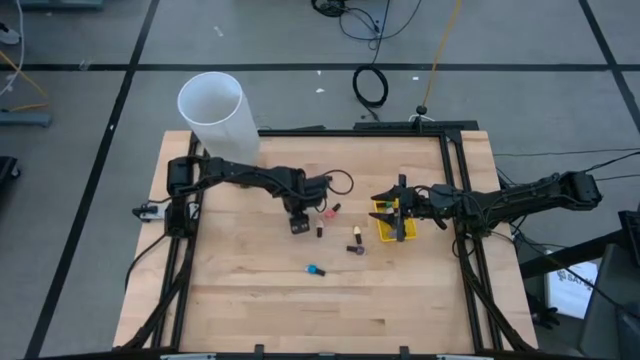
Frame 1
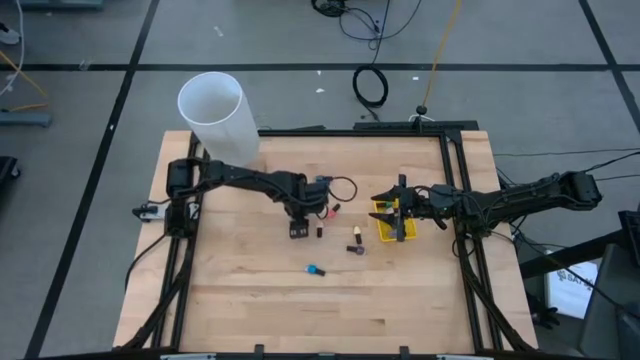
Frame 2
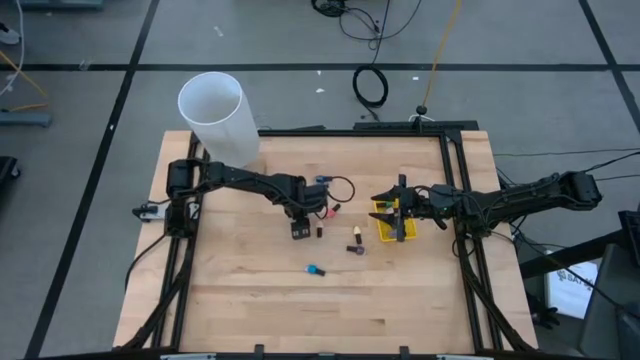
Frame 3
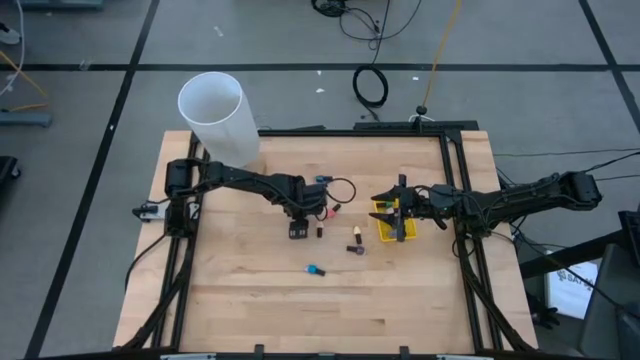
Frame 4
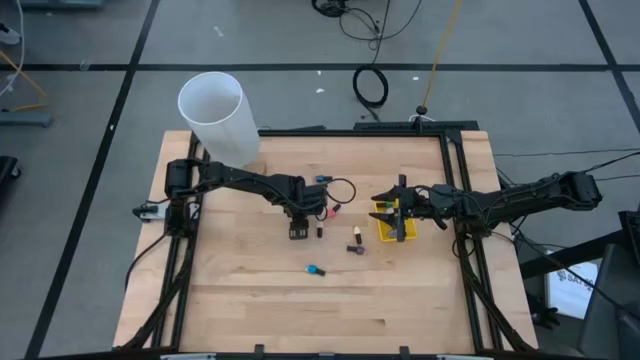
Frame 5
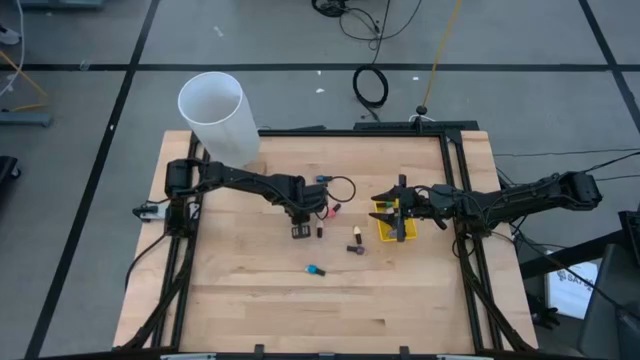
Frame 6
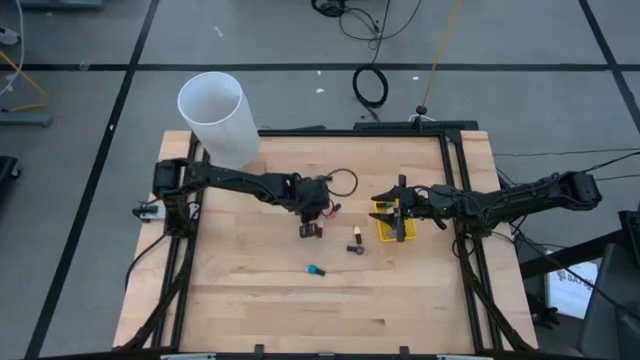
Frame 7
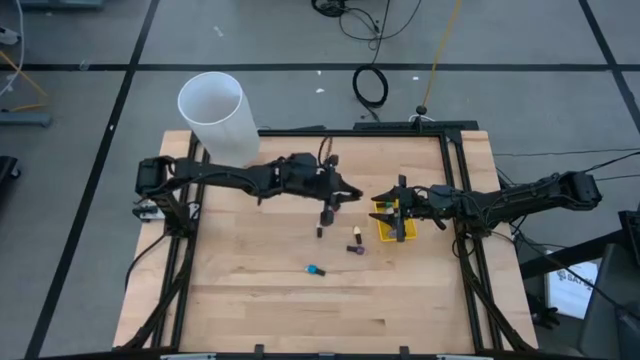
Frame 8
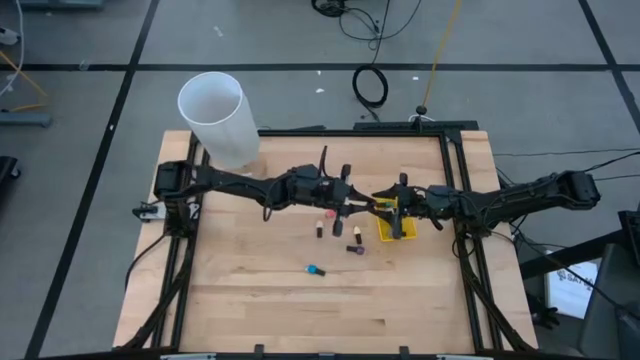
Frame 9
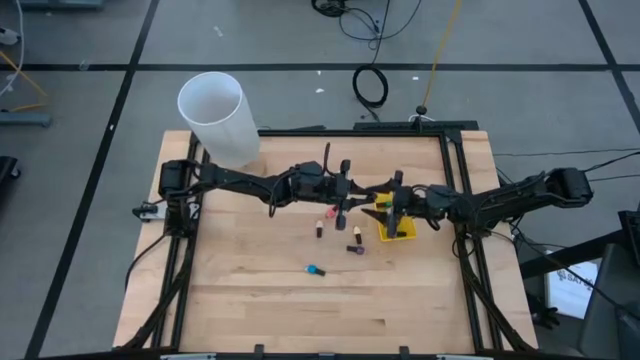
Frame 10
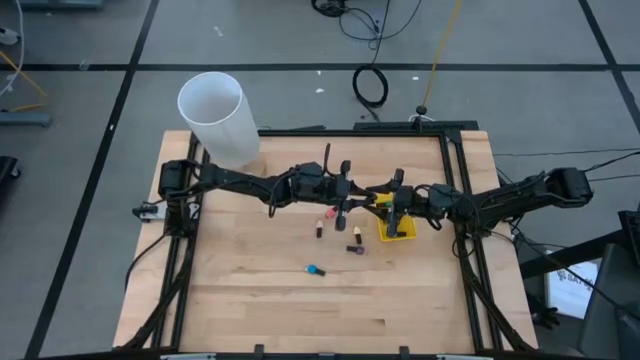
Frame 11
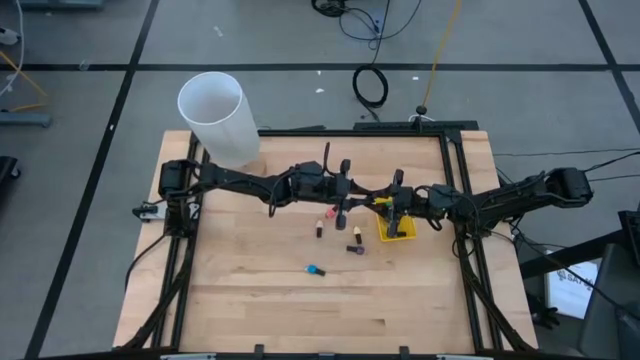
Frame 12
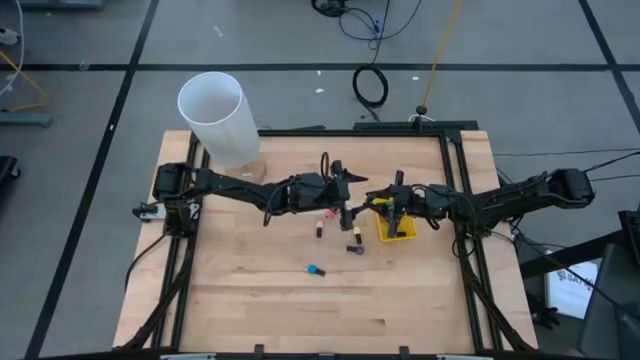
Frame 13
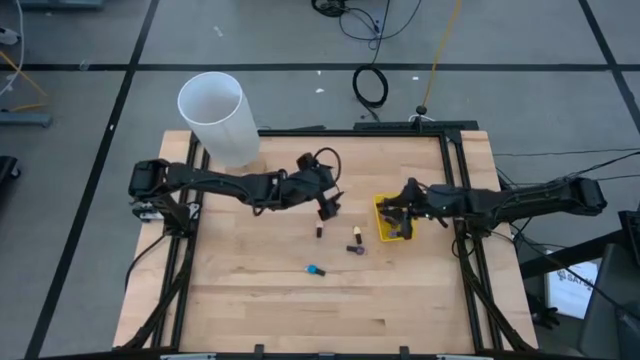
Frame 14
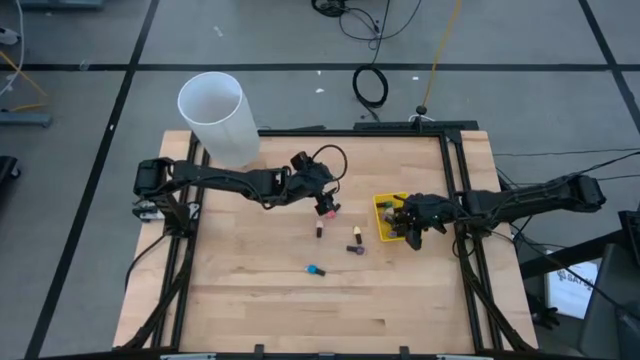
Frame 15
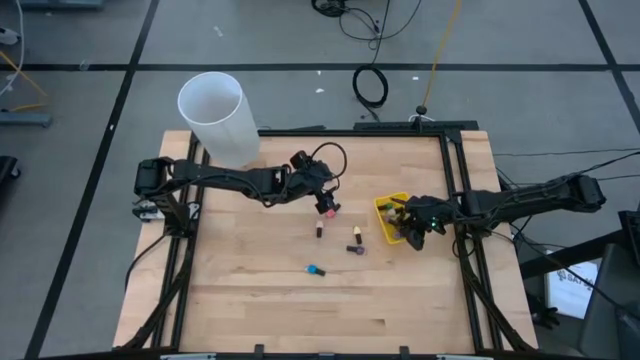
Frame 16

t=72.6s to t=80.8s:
Task: Pick & Place Nail Polish
Put the dark green nail polish into the yellow bin

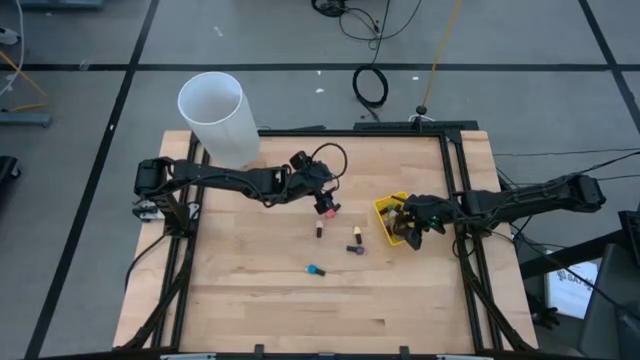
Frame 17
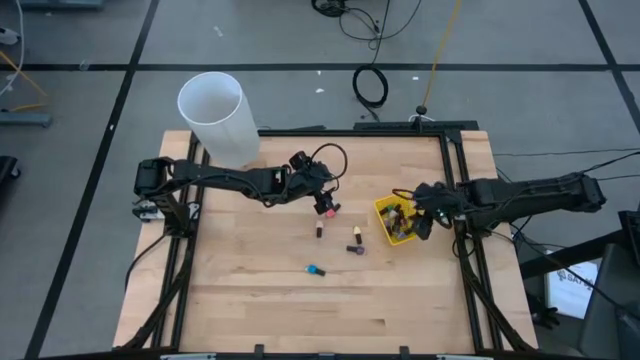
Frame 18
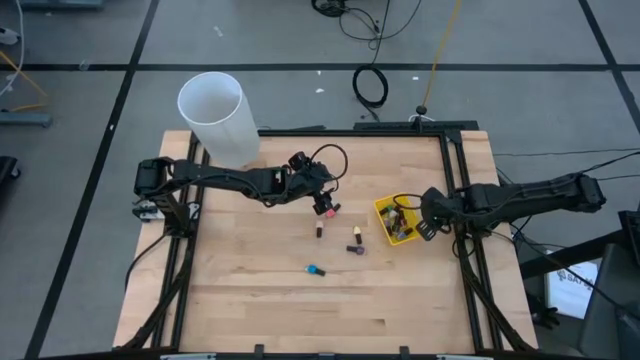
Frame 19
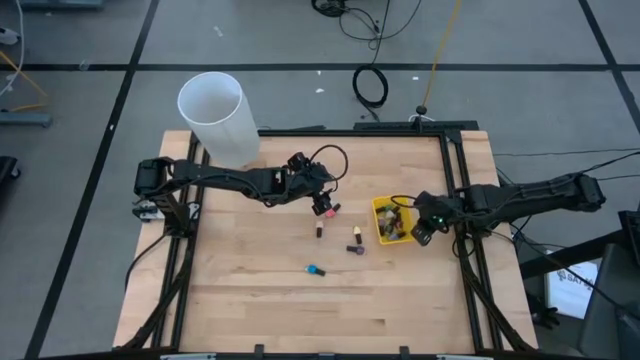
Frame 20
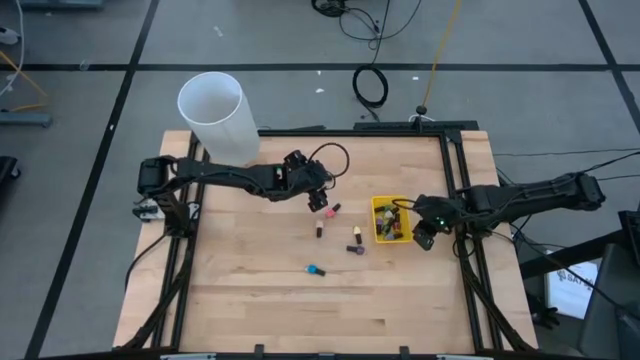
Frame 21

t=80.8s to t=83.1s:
Move the yellow bin

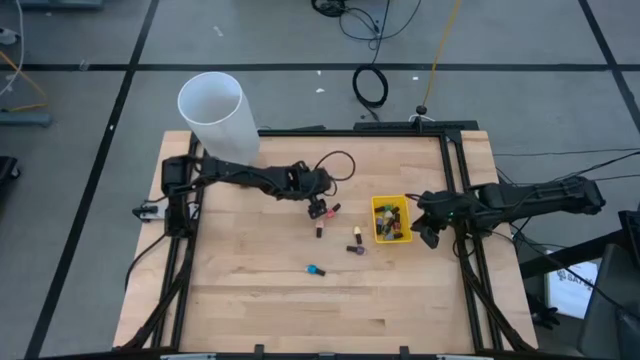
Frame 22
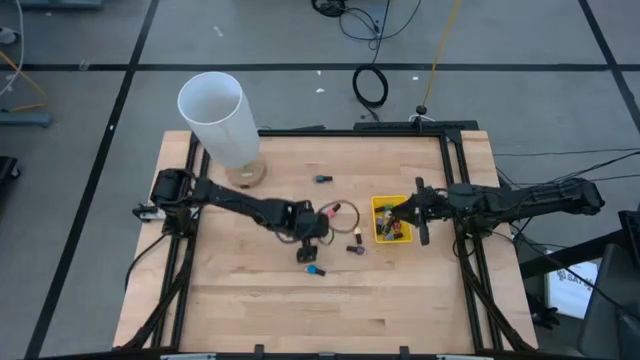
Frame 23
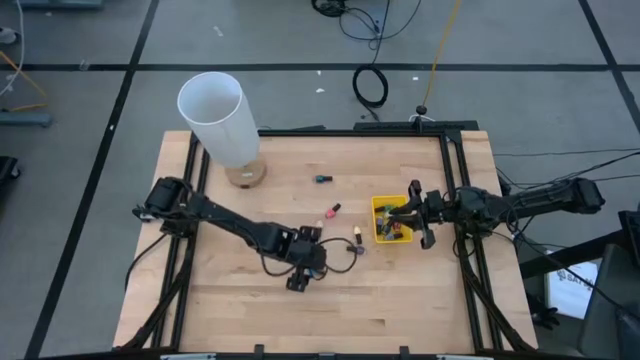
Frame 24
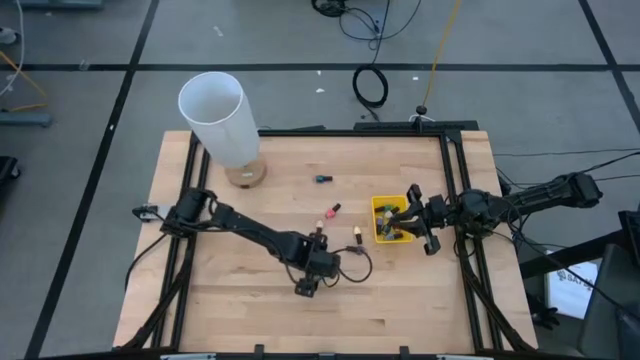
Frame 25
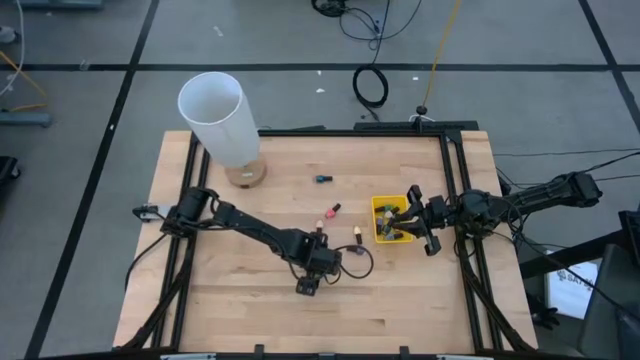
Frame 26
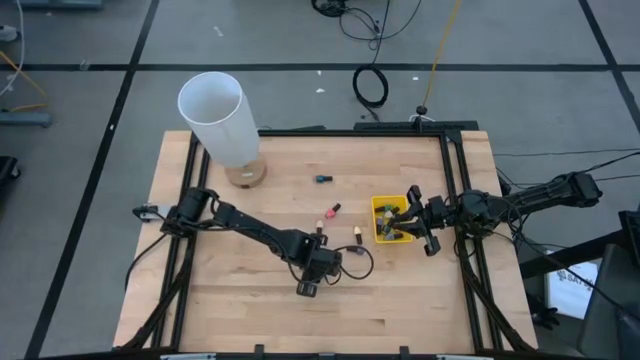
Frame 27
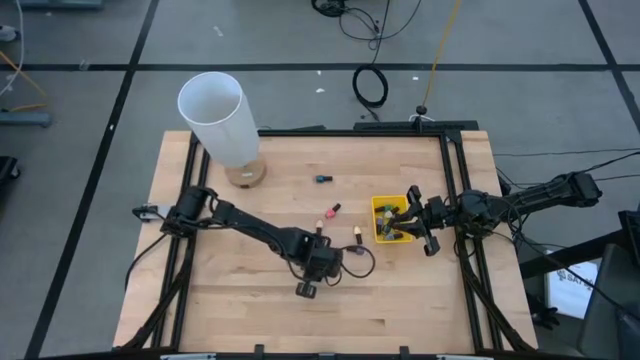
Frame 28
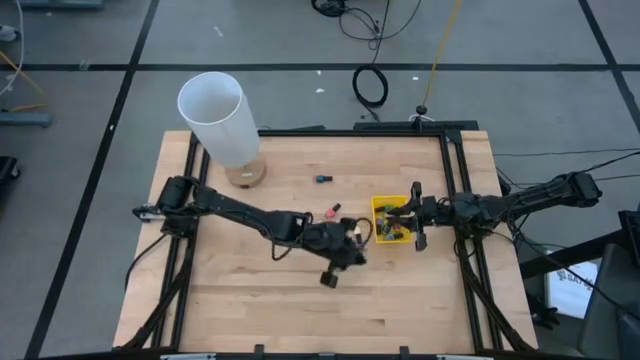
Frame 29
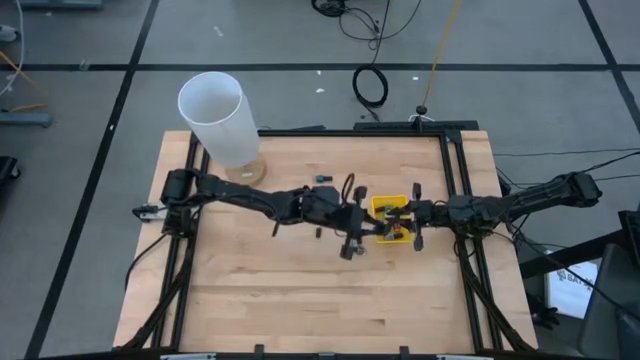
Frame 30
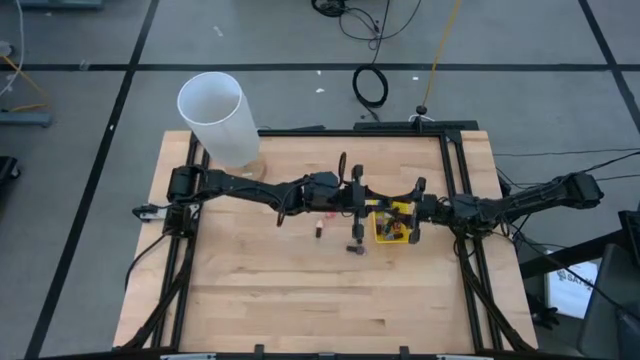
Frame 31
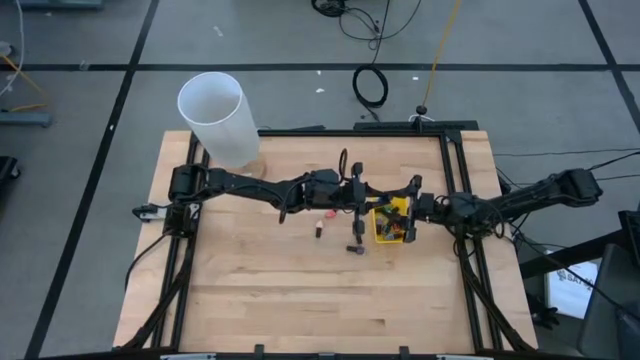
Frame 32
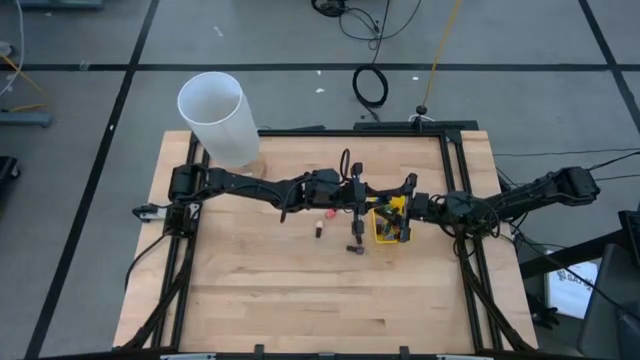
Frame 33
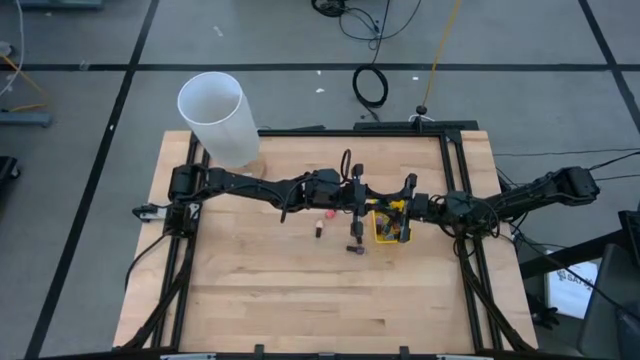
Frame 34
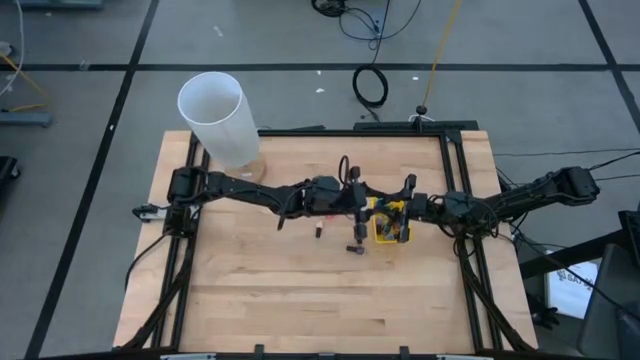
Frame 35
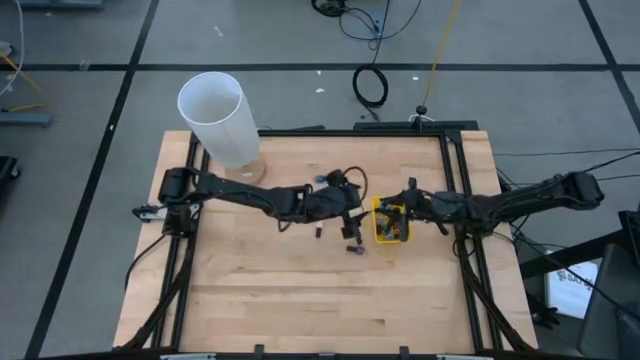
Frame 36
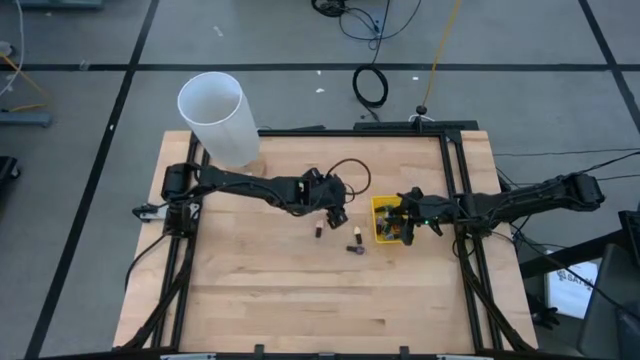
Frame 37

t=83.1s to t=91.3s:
Put the medium blue nail polish into the yellow bin

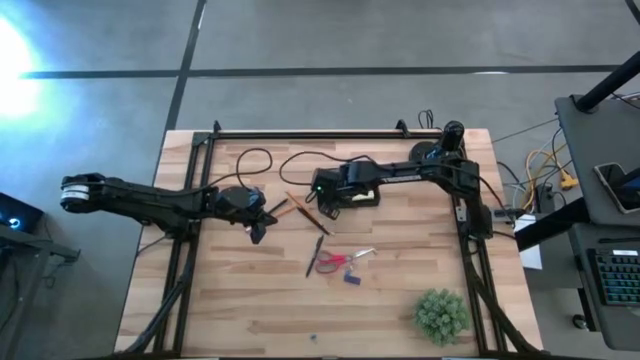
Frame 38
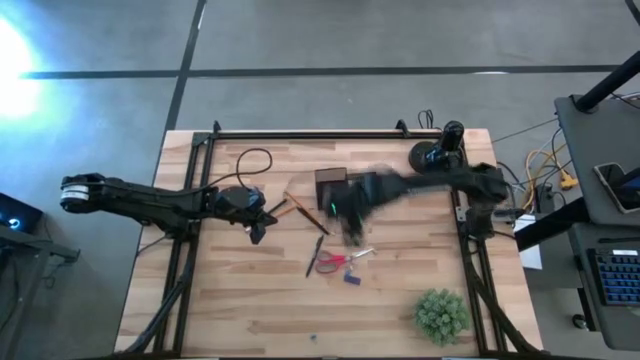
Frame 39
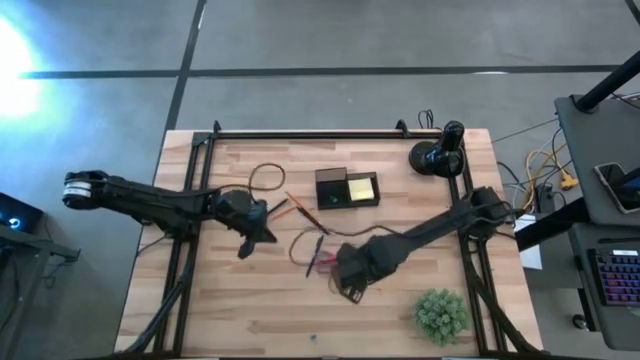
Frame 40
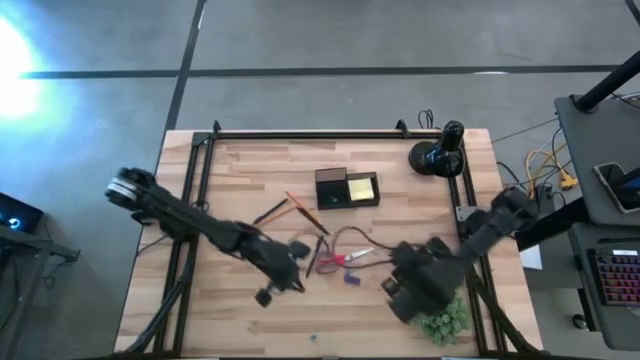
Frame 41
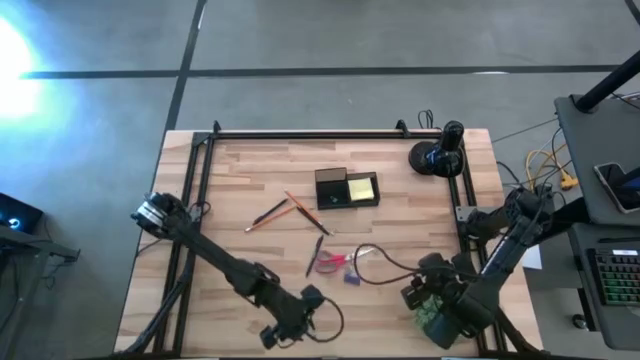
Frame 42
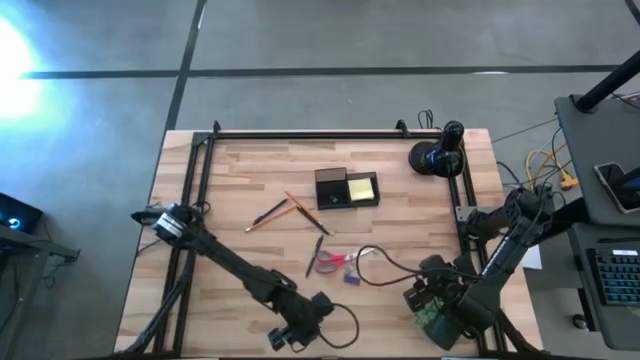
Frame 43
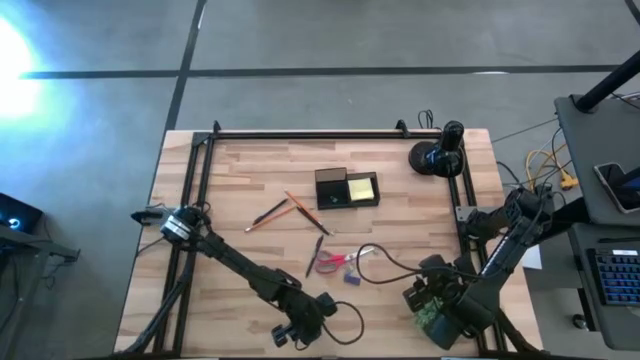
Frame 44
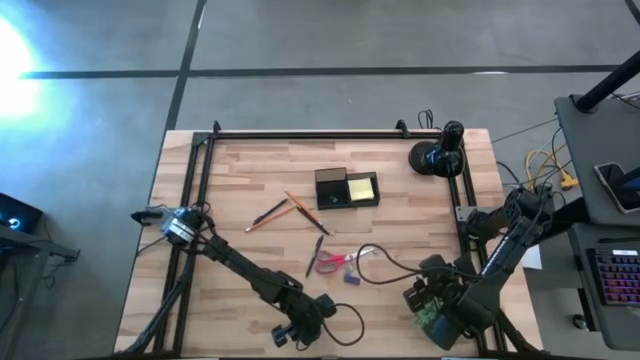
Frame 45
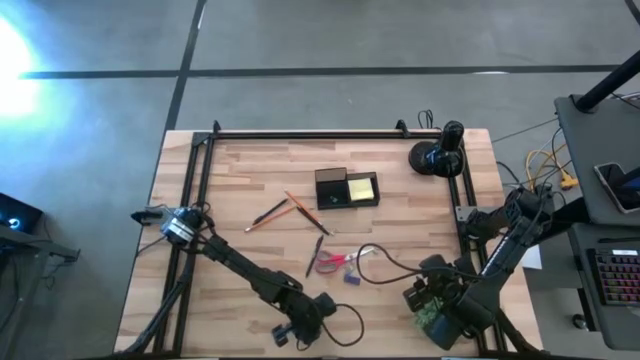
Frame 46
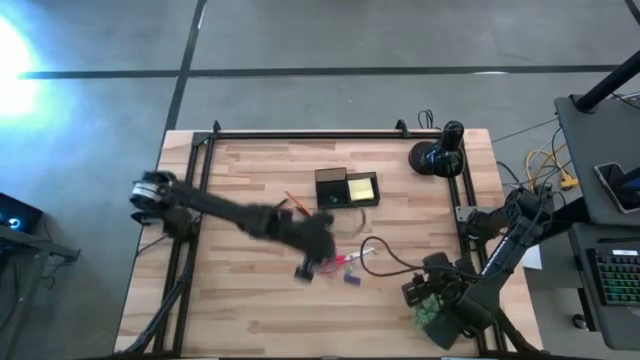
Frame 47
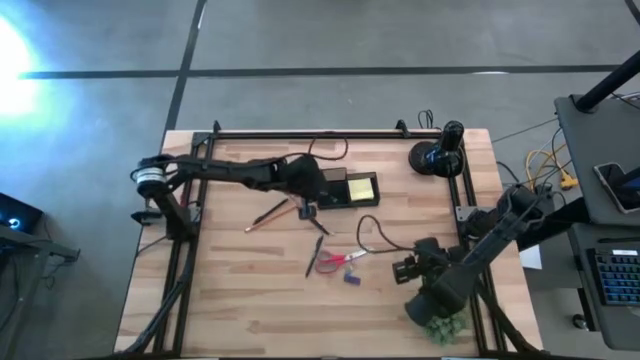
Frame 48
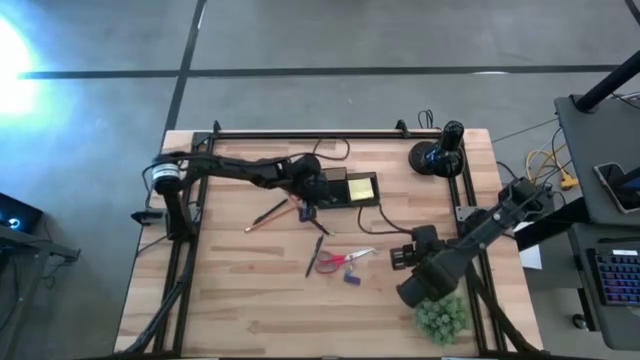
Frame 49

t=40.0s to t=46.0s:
Task: Pick and place office supplies into organizer
Put the bottom blue binder clip into the desk organizer
